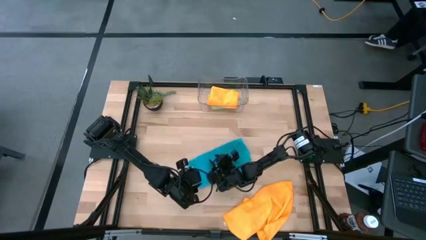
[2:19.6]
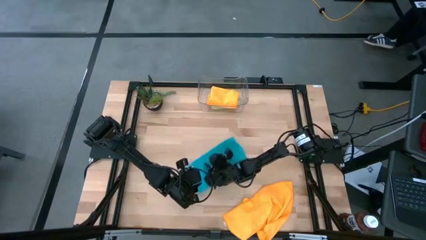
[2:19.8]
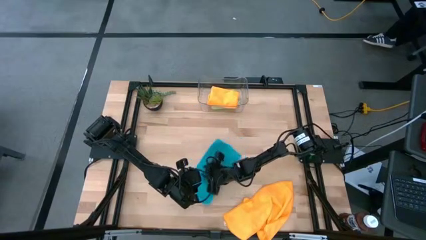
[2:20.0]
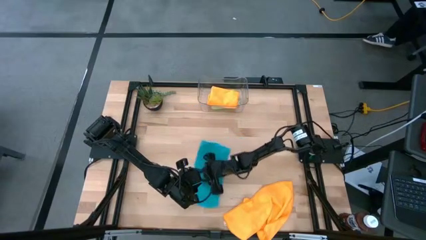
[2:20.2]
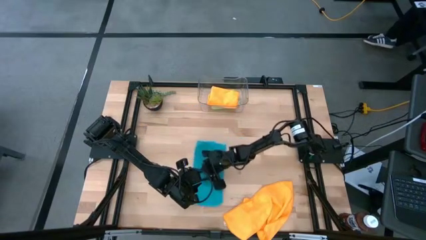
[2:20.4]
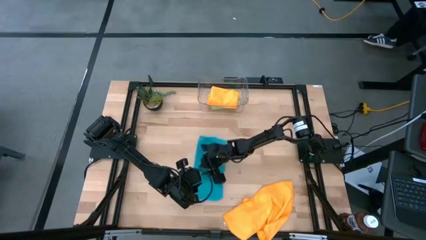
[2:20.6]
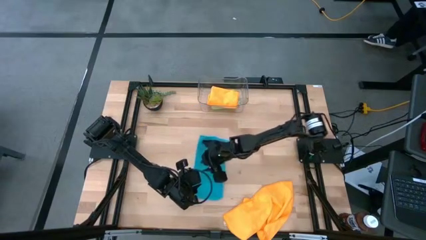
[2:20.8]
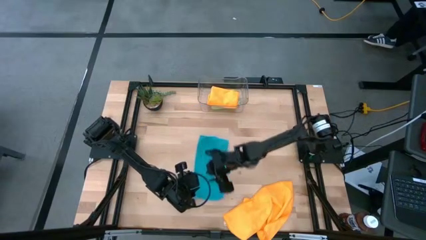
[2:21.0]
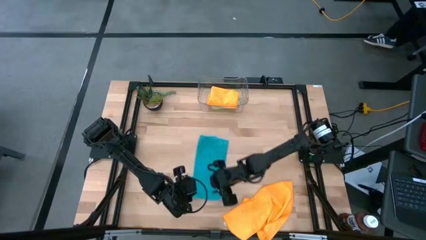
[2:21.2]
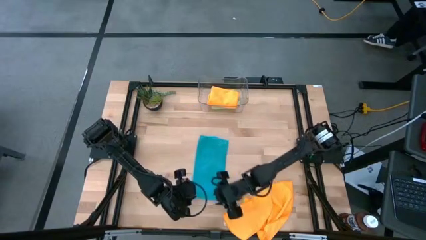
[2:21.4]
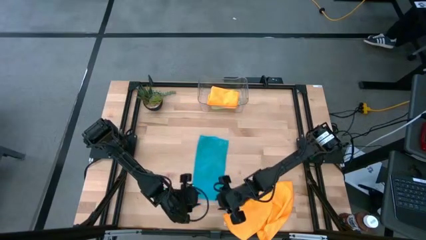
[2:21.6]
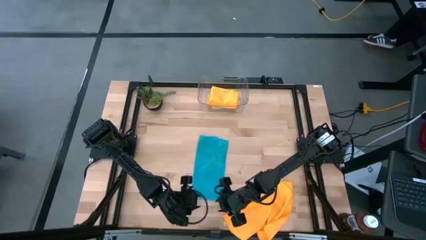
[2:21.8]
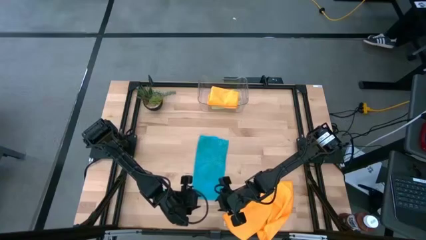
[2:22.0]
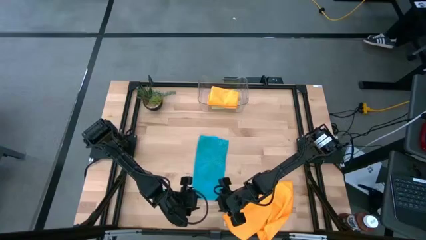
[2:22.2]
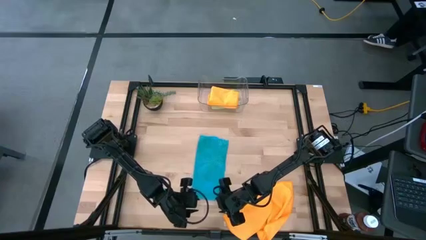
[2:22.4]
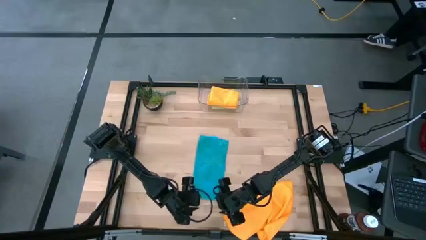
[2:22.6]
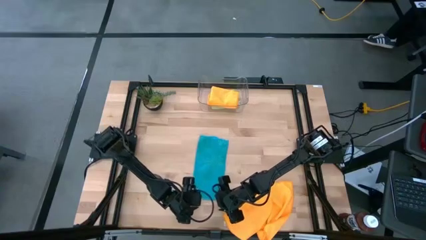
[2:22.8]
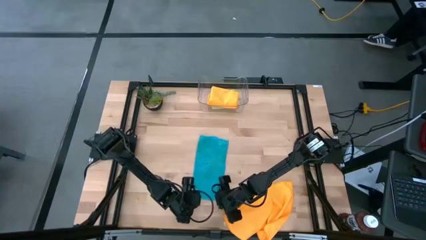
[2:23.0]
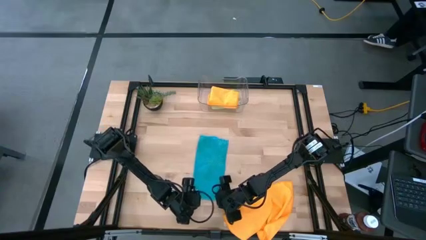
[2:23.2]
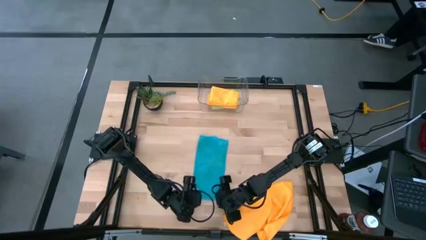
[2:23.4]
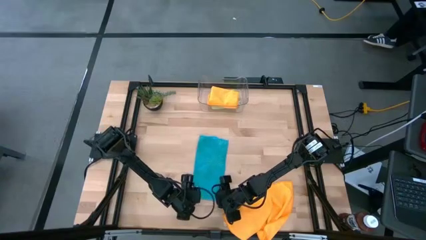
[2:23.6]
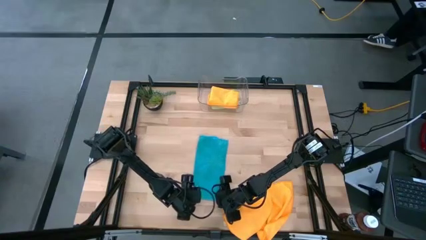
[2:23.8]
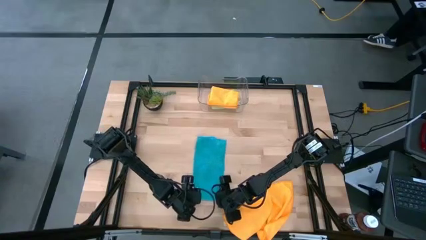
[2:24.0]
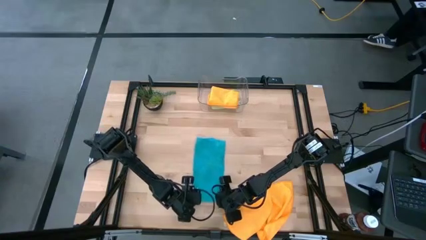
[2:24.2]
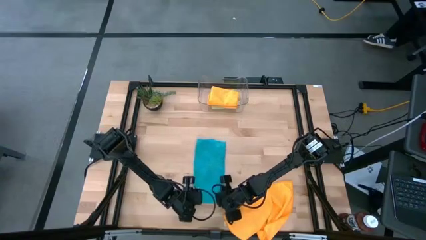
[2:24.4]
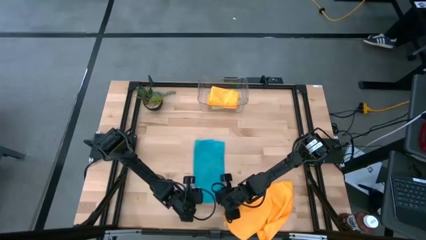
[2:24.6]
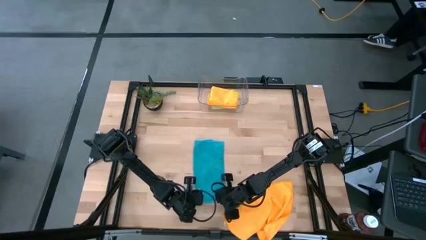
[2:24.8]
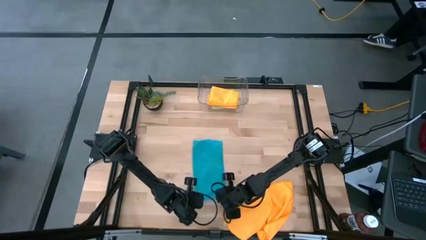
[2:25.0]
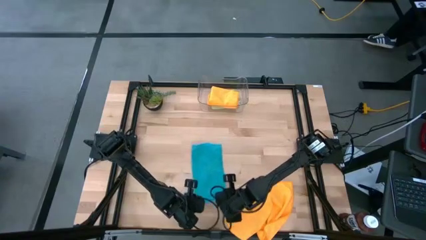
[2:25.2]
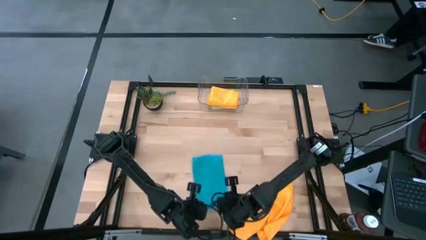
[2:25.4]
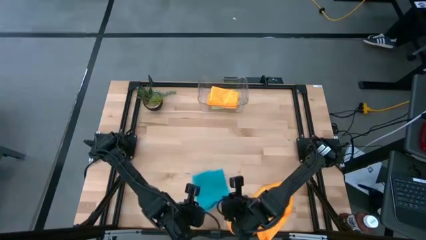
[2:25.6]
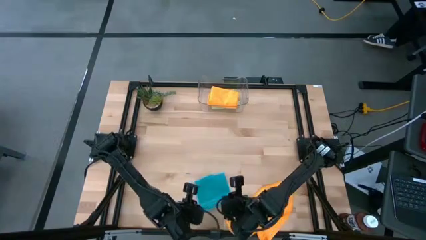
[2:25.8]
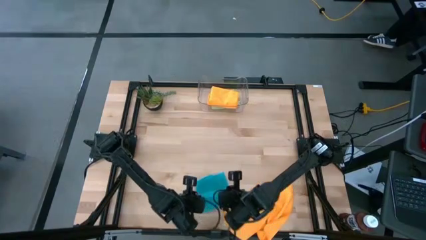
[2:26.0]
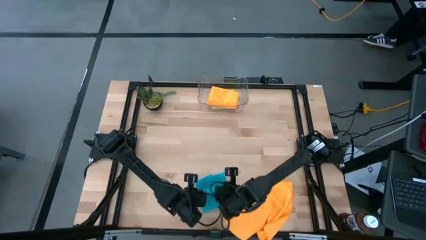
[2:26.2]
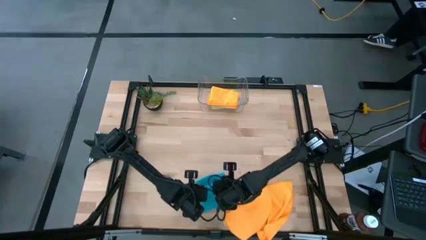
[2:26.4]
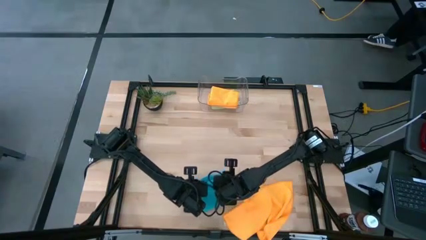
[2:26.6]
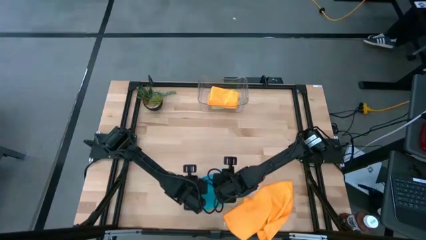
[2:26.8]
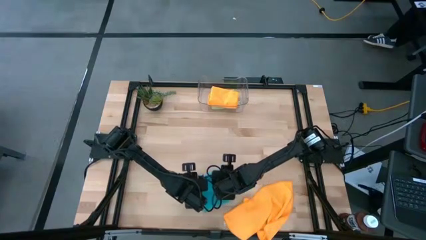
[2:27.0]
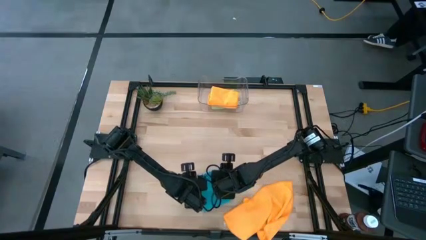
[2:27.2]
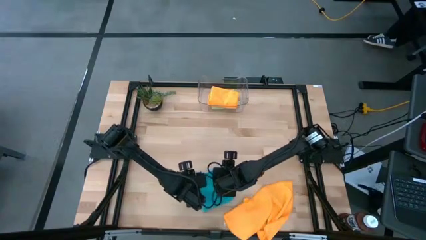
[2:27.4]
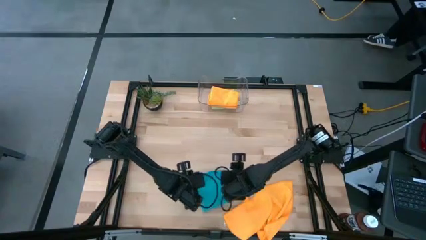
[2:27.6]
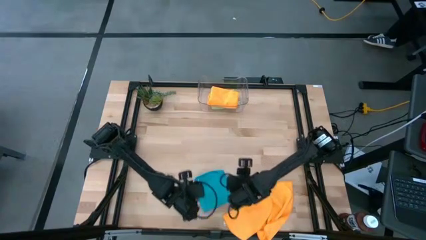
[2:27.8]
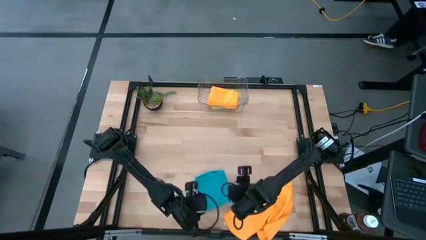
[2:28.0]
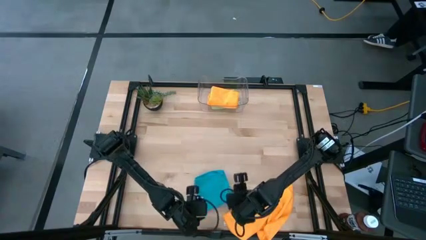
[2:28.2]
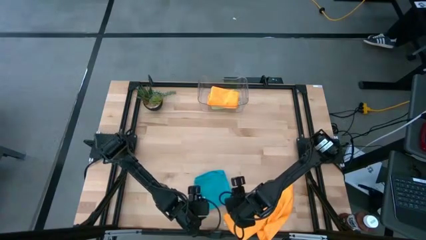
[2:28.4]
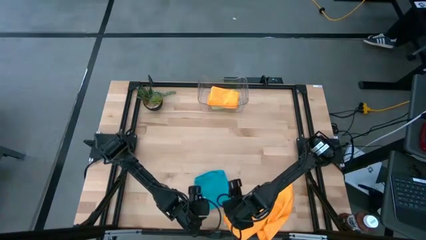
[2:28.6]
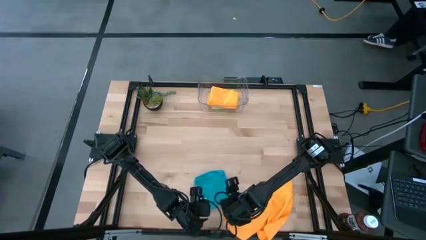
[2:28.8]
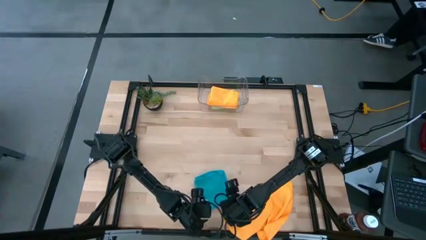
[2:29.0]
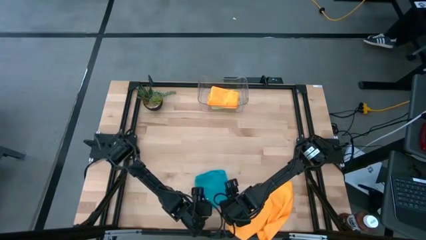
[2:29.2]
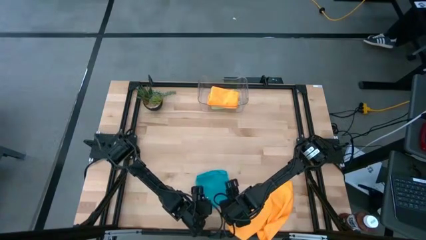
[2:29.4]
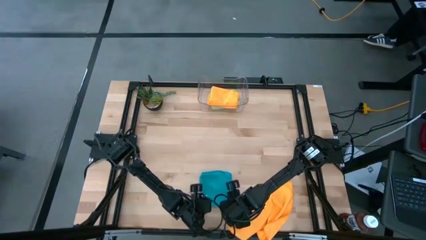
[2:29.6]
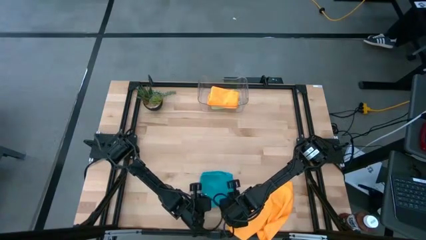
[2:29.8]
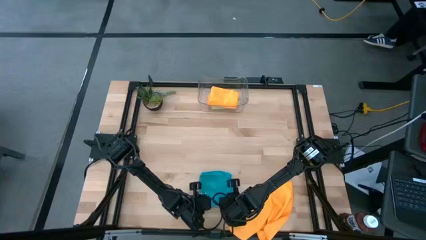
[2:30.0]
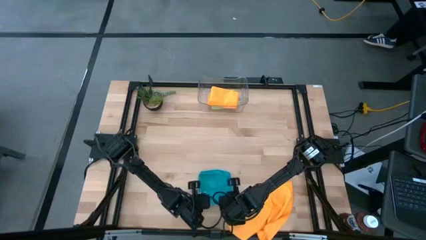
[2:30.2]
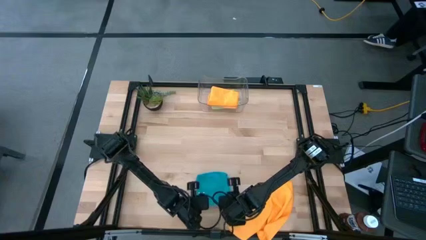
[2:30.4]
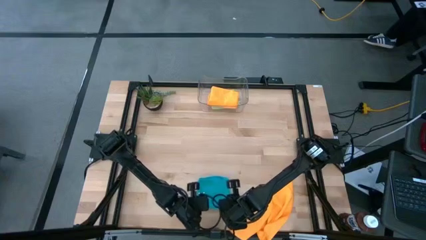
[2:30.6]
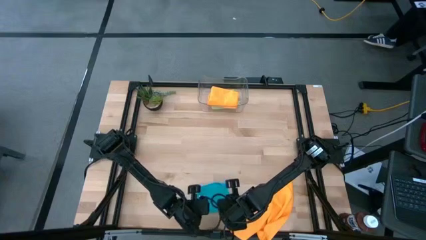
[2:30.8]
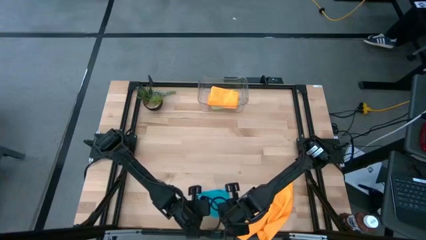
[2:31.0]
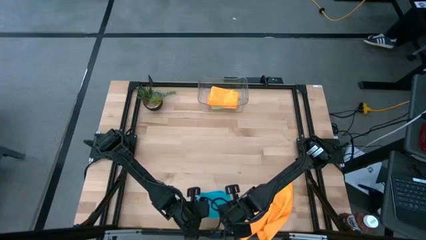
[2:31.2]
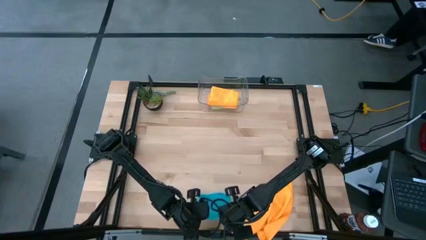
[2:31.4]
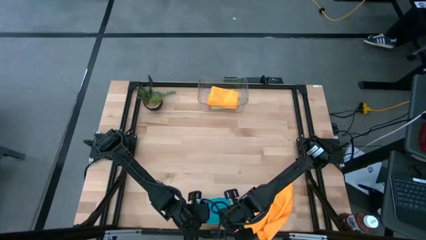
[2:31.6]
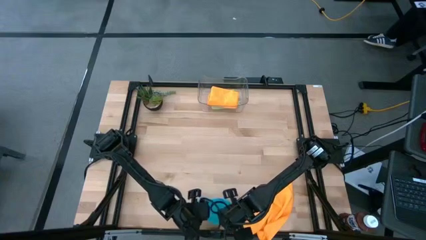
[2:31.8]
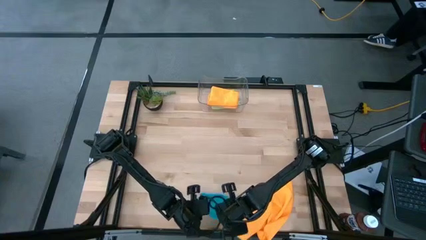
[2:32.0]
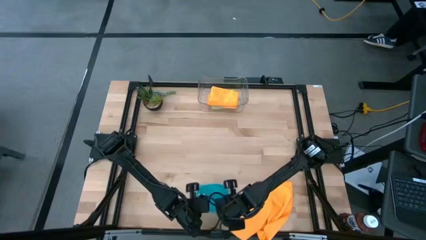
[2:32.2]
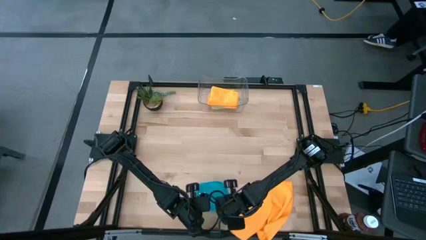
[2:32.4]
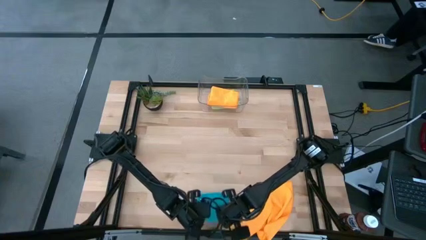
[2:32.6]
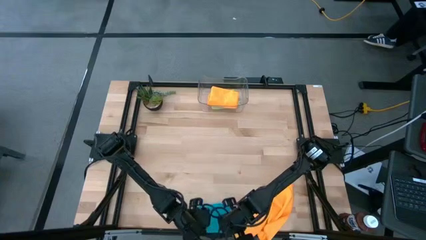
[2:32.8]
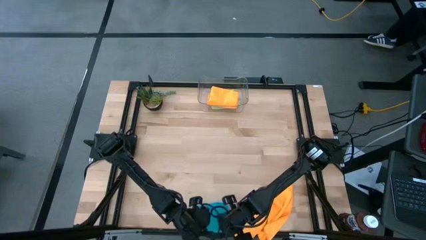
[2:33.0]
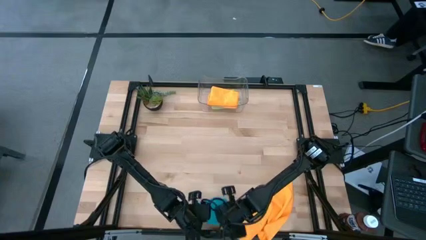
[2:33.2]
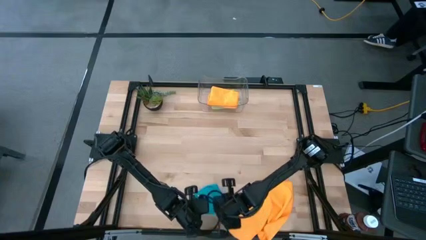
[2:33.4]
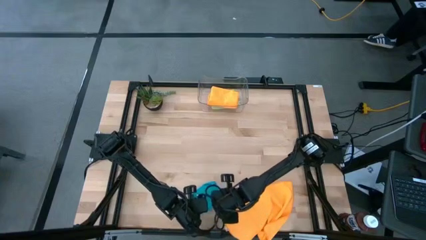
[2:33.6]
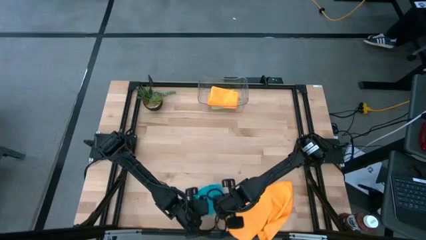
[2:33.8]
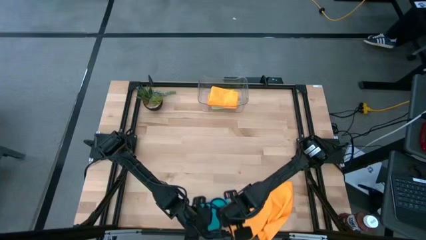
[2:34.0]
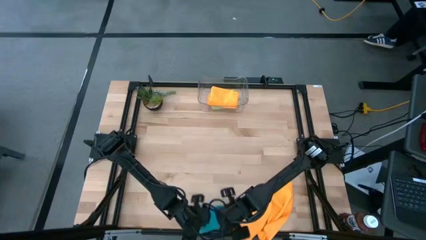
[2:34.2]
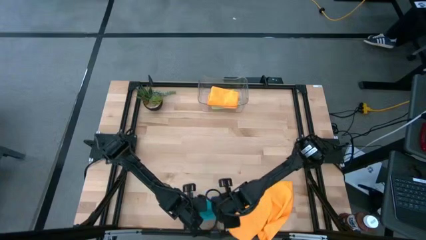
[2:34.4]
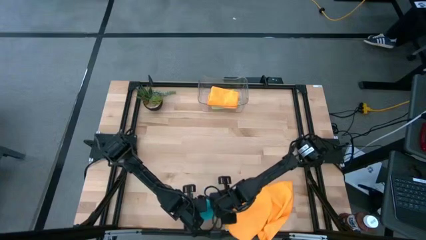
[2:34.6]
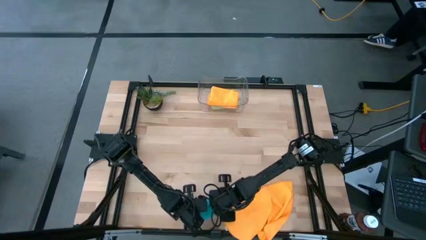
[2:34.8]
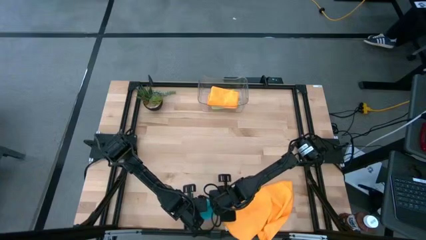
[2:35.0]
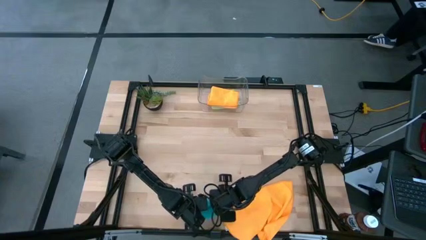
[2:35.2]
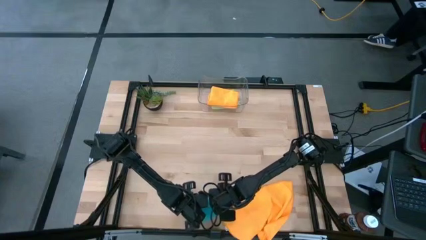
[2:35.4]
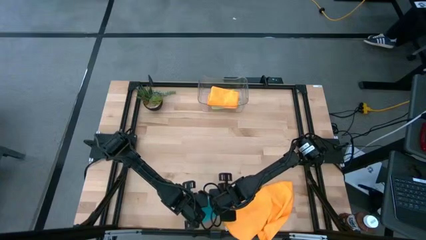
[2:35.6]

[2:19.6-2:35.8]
Task: Fold microfiber towels
Fold the blue microfiber cloth
